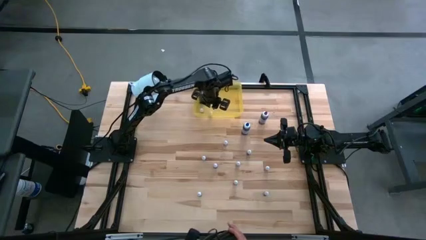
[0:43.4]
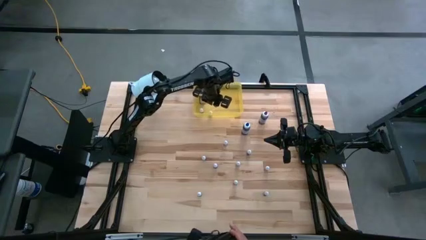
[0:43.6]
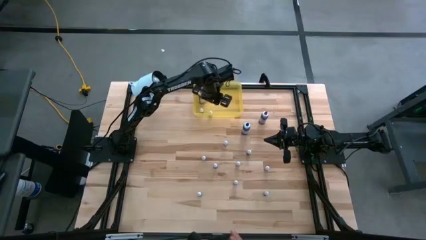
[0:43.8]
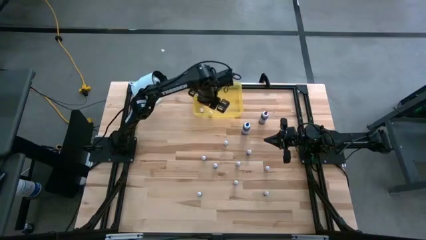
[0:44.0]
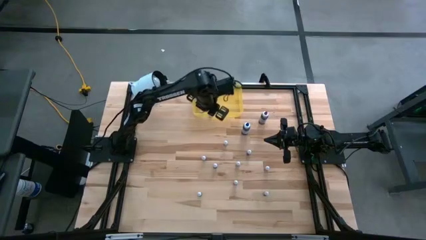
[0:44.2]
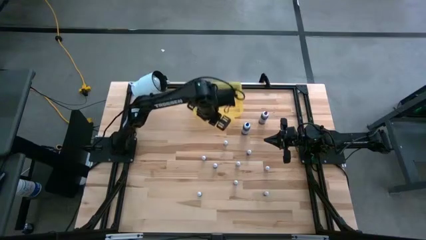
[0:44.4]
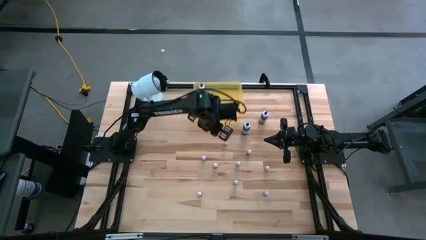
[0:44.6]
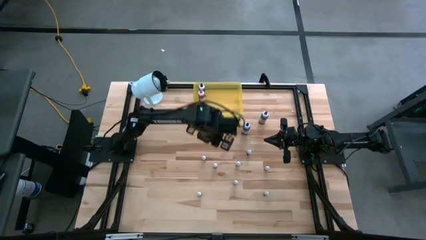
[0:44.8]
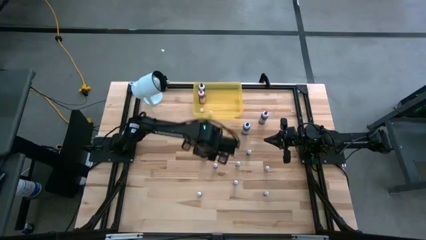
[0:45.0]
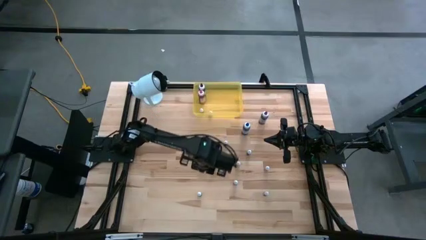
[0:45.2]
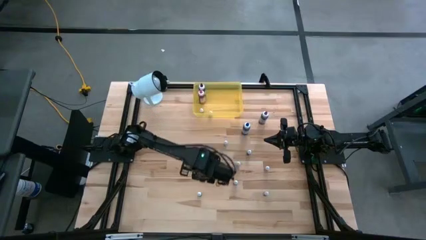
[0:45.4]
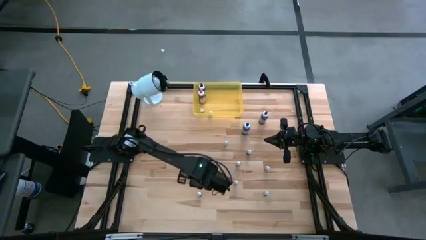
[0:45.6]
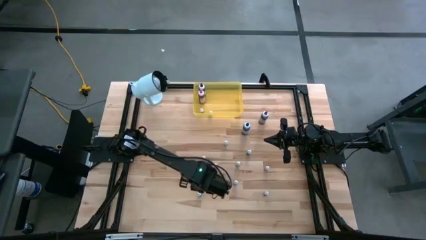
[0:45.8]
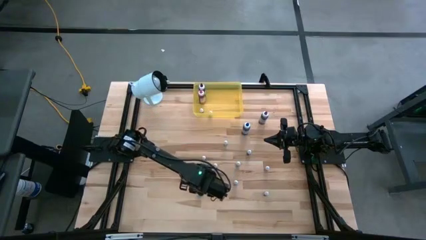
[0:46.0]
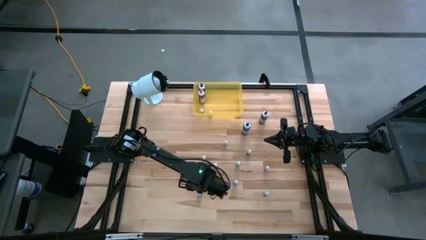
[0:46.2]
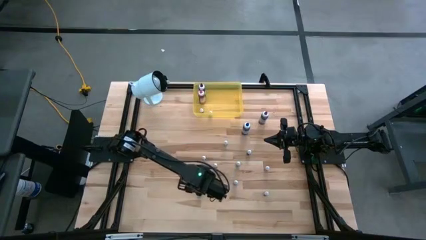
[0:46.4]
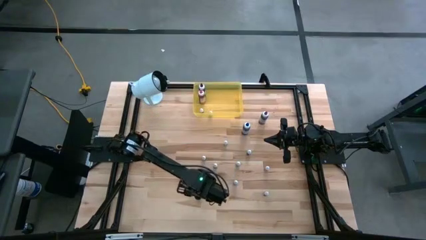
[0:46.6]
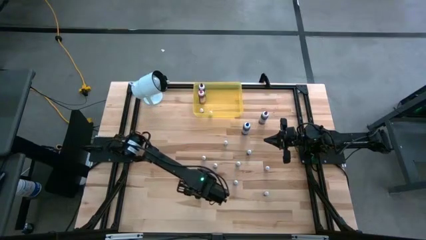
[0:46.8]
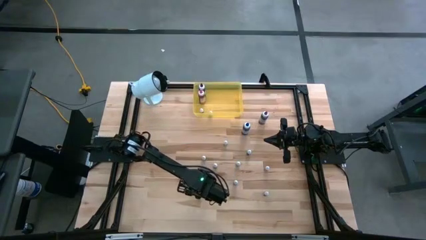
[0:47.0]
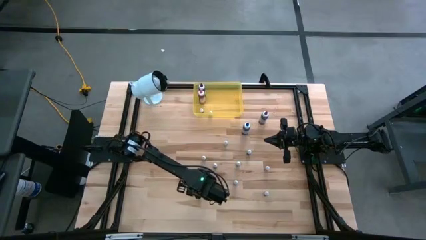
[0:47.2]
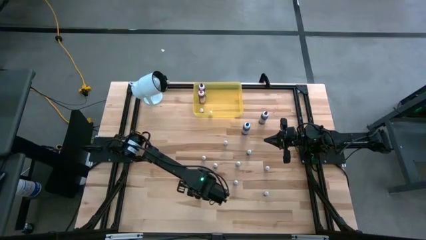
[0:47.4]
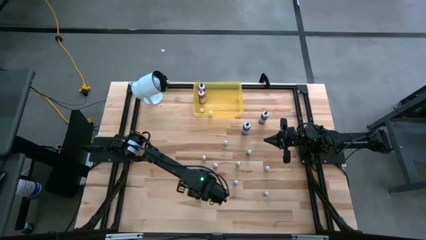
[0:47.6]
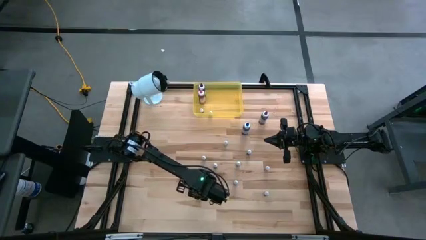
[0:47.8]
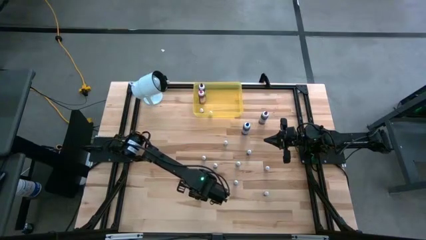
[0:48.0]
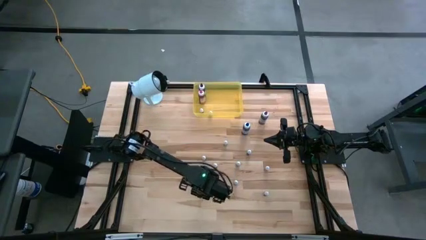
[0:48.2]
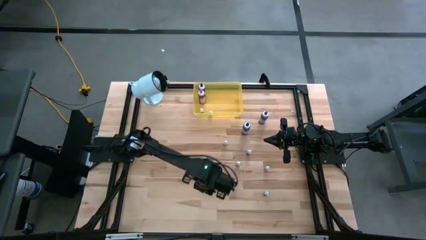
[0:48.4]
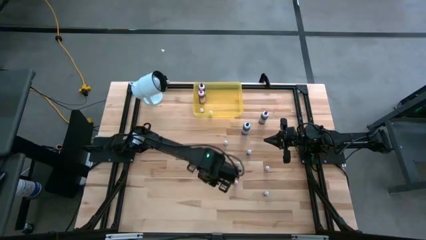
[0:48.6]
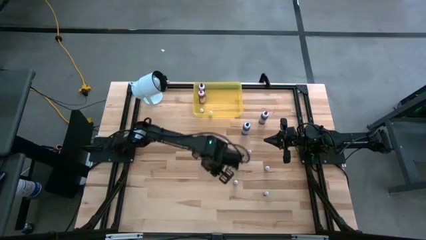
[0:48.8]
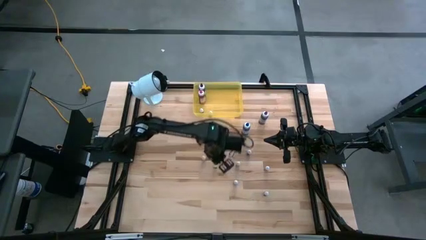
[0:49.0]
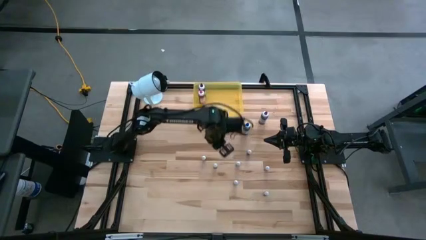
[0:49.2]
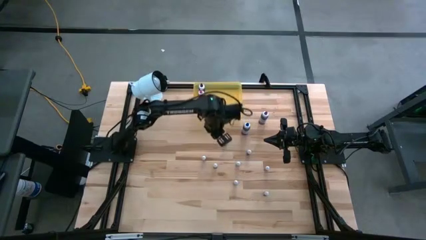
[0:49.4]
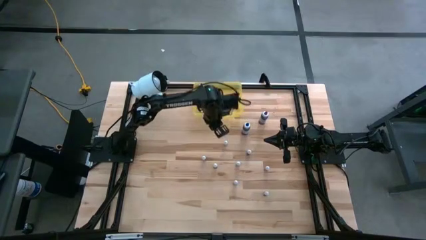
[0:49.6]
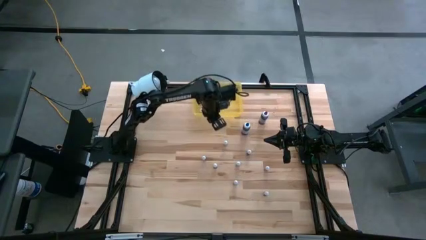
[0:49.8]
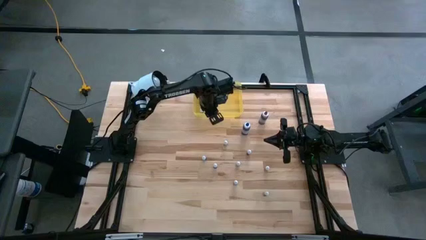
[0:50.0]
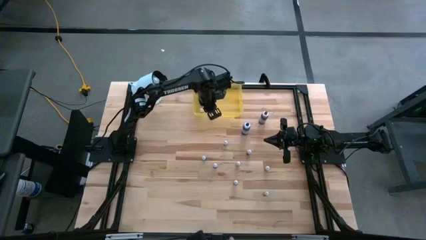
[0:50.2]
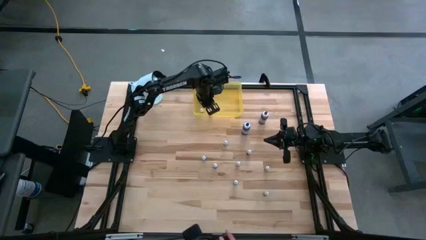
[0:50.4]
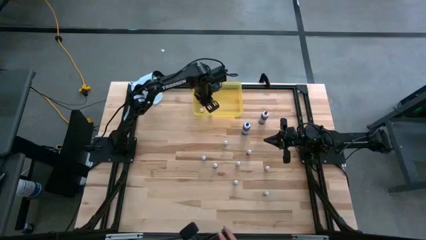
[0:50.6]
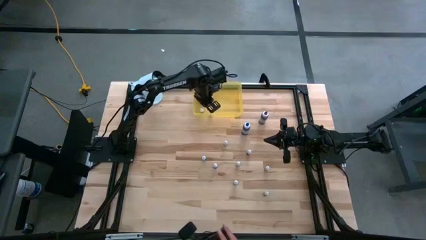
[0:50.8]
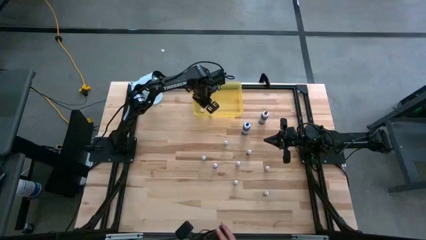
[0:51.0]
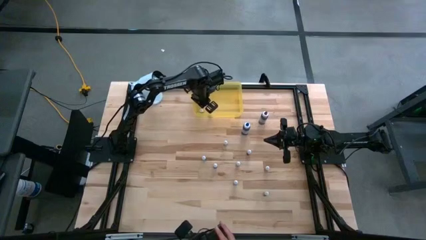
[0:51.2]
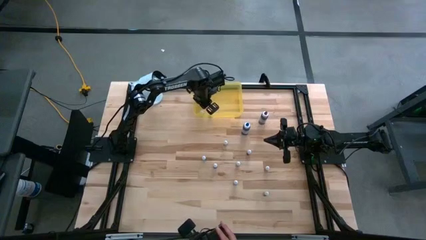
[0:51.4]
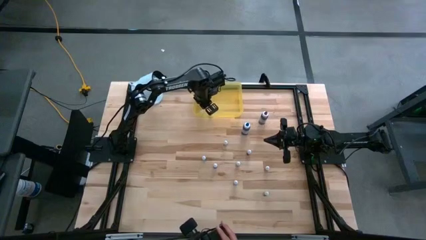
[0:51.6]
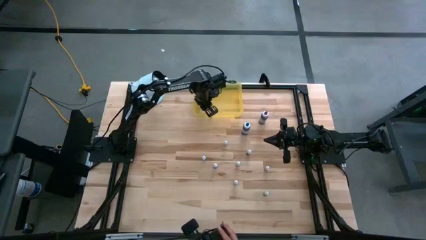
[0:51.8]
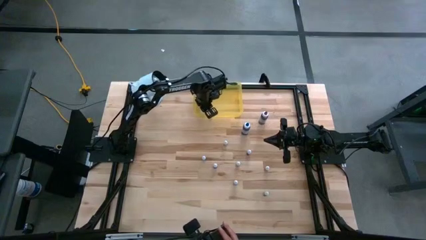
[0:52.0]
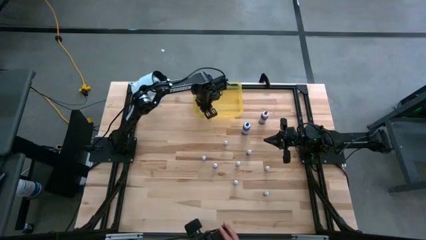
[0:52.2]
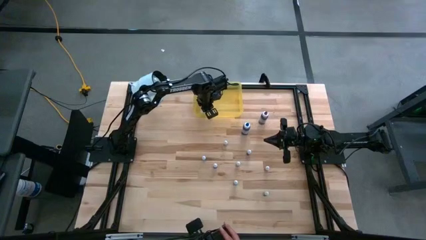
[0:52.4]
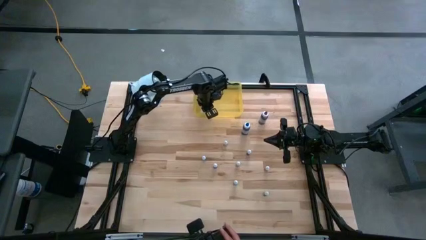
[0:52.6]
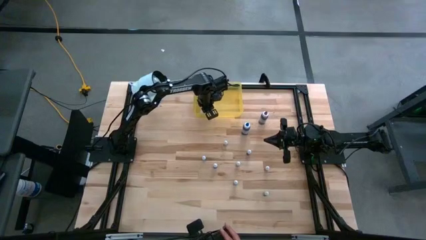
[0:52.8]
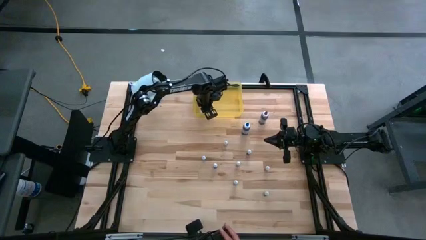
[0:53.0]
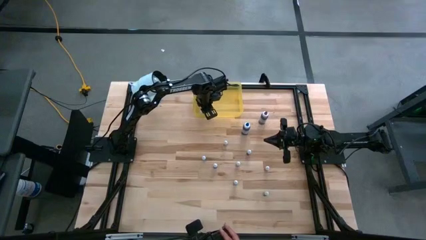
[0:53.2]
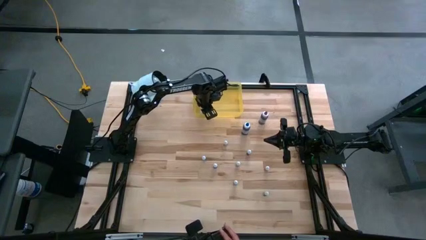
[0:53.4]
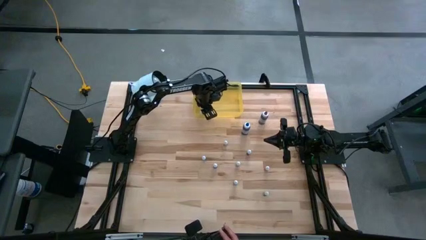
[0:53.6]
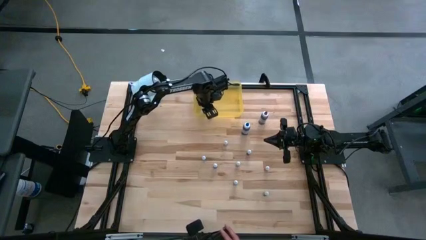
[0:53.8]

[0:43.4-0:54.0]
Task: Pick & Place food coloring
Put the small blue food coloring bottle into the yellow container

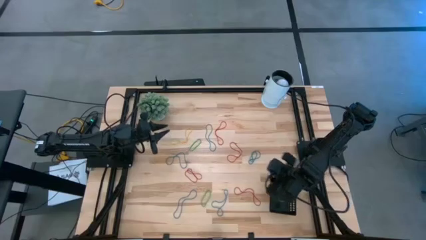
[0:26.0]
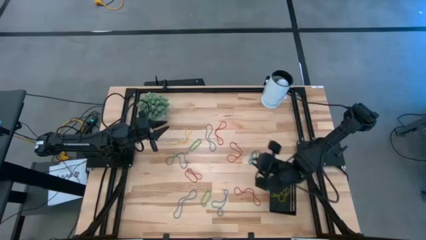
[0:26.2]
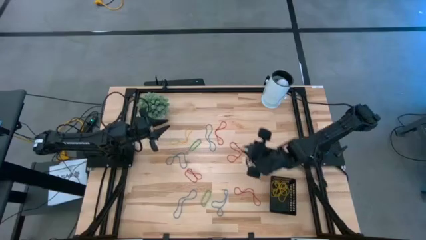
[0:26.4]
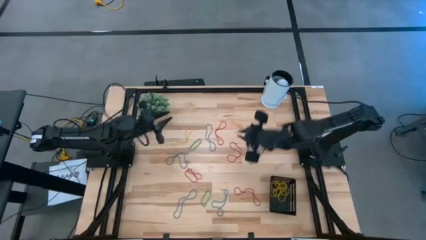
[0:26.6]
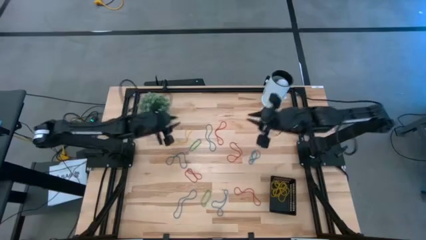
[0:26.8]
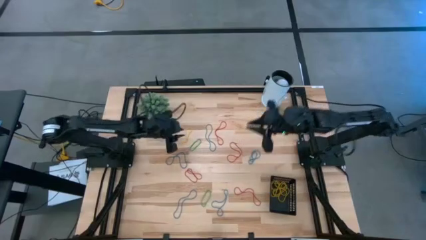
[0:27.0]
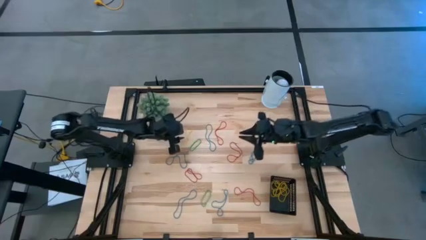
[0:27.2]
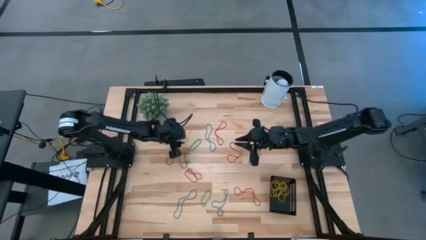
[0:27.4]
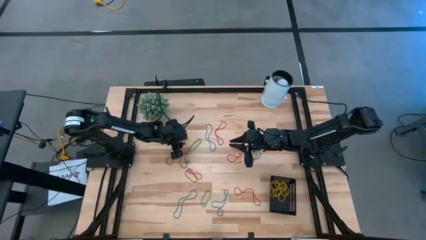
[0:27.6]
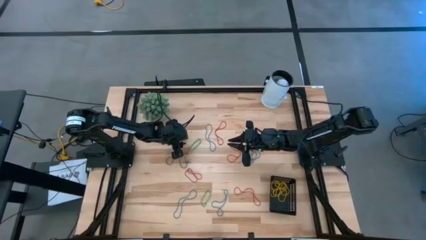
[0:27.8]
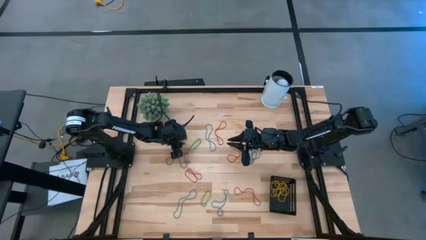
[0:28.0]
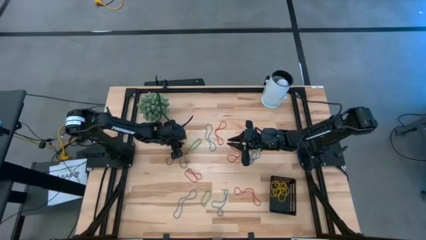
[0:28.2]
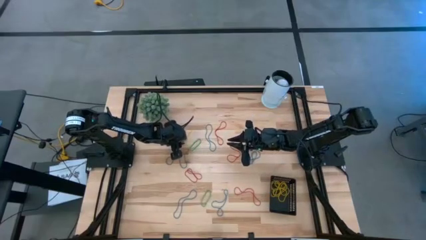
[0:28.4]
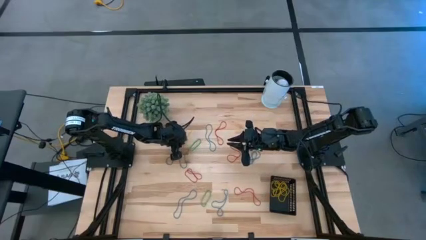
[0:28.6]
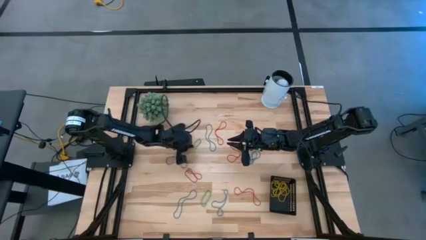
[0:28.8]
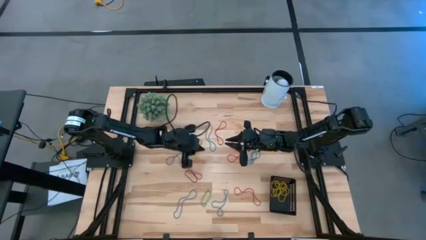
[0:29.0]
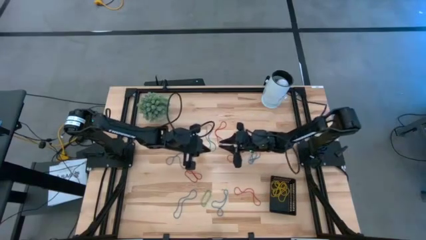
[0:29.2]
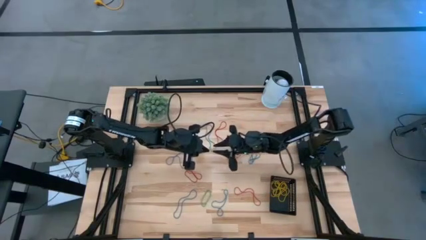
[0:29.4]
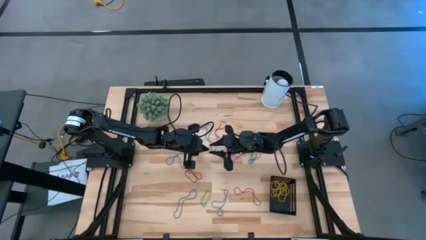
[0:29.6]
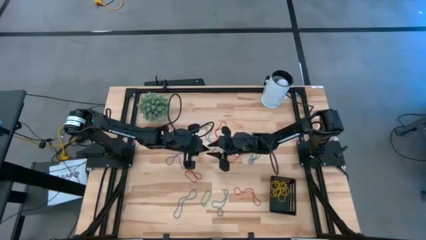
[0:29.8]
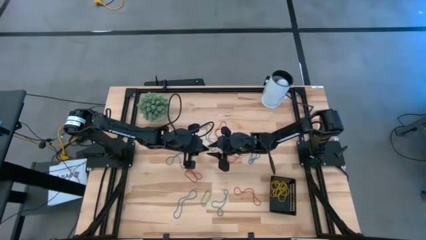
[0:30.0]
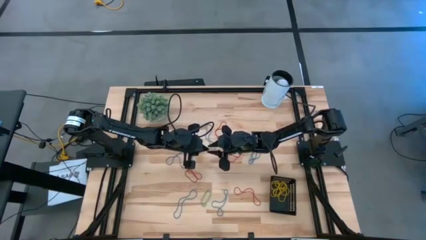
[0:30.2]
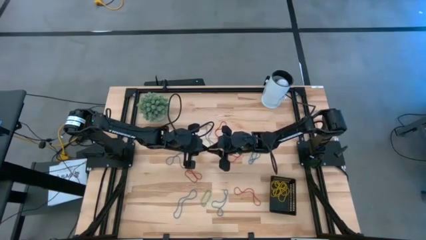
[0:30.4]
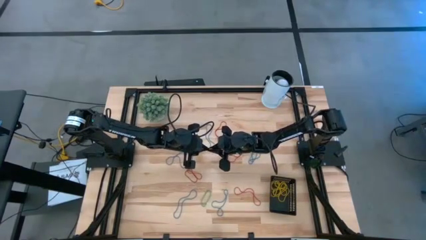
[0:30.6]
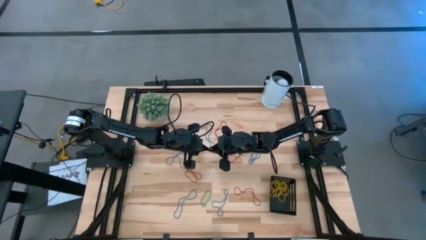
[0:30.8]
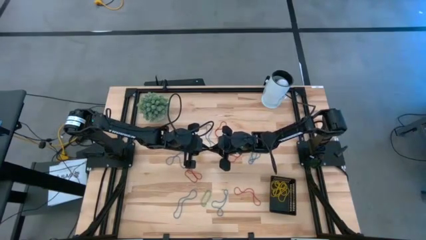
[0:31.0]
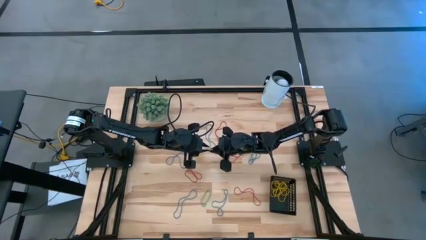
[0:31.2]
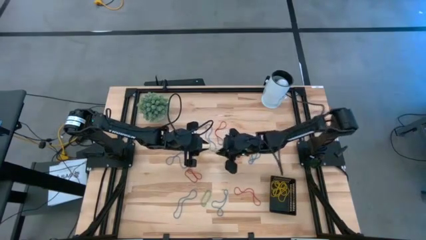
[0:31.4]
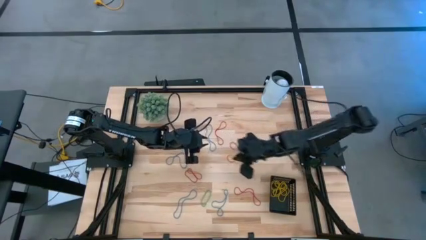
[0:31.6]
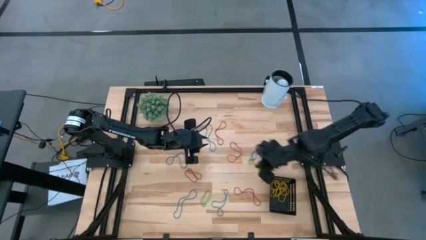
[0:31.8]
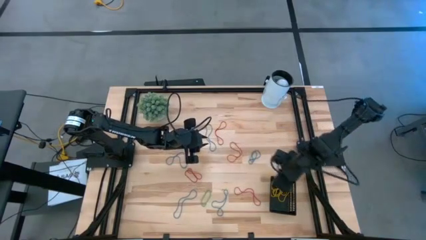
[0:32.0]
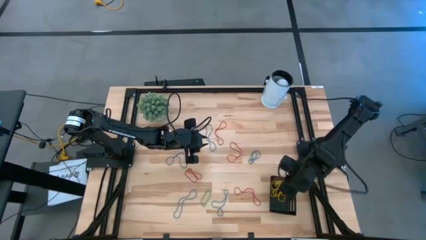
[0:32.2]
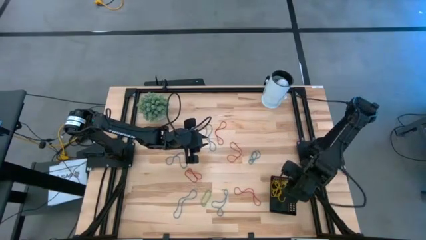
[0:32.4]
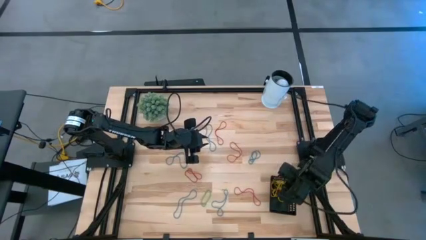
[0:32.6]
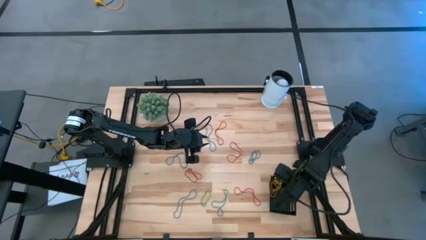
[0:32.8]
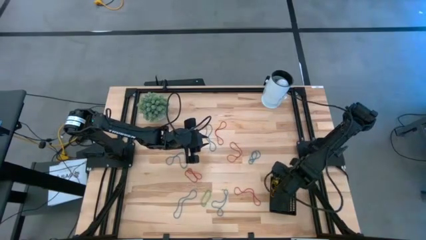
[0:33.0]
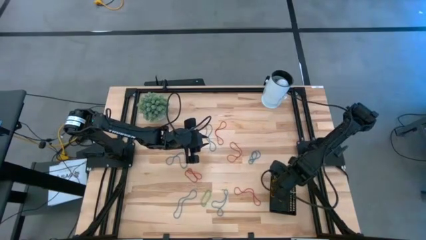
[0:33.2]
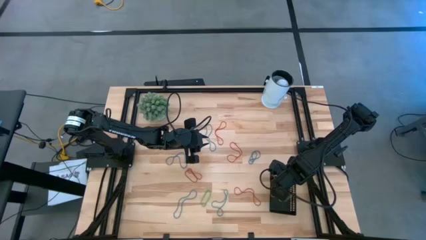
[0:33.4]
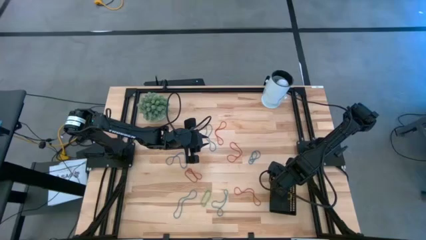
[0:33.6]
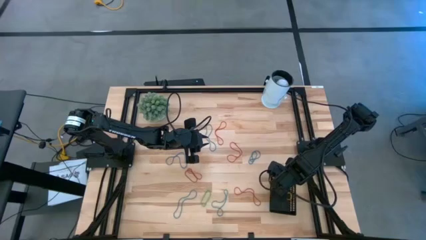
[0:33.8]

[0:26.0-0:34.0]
Task: Pick and place items into bin
Put the yellow rubberband into the black basket
